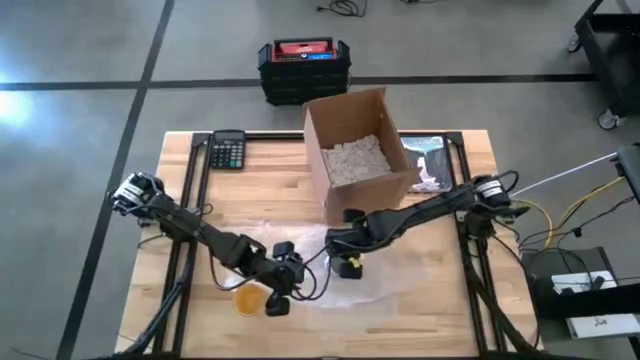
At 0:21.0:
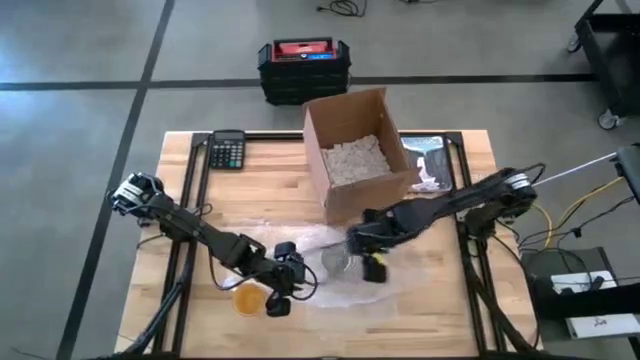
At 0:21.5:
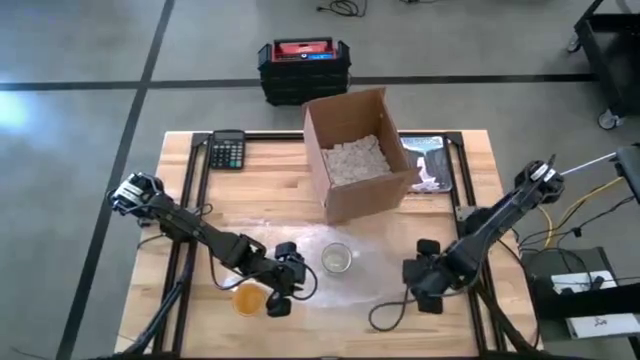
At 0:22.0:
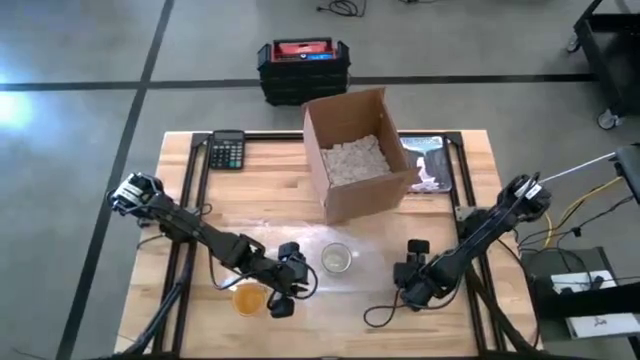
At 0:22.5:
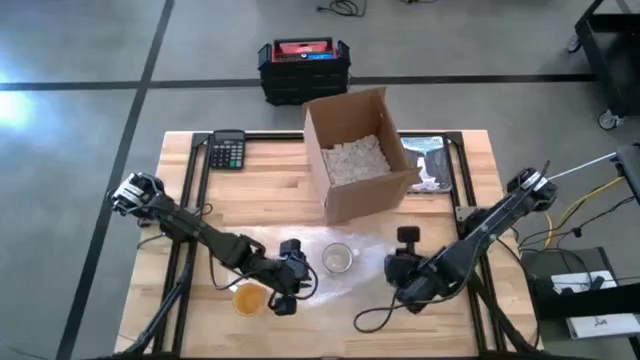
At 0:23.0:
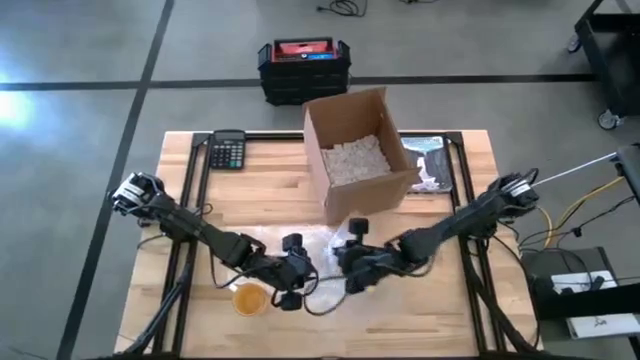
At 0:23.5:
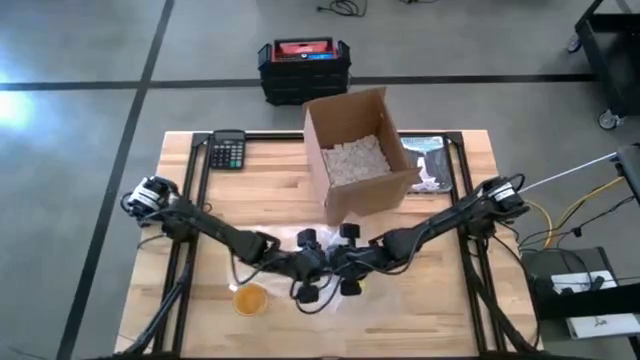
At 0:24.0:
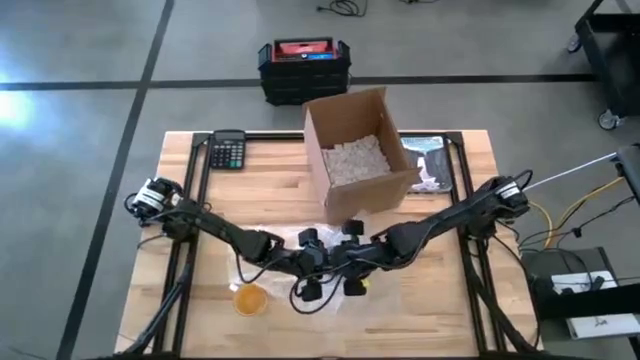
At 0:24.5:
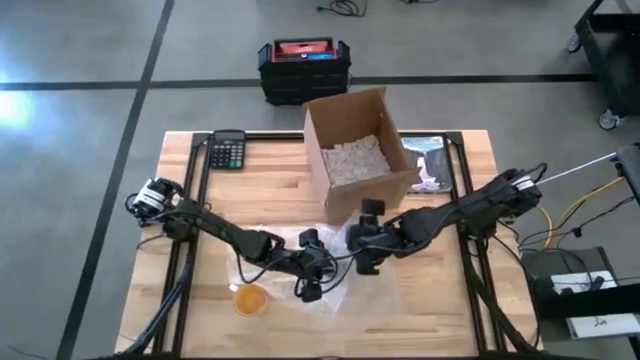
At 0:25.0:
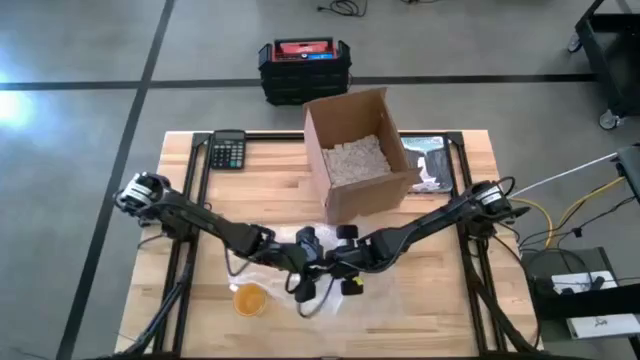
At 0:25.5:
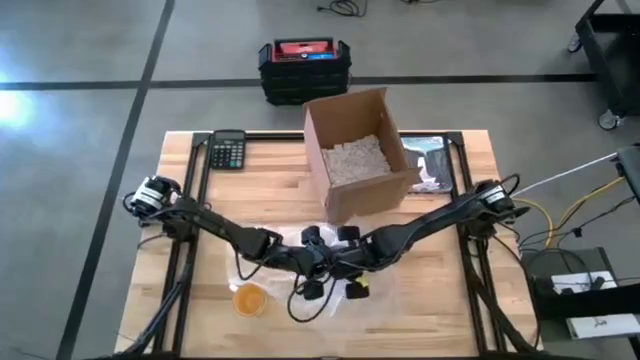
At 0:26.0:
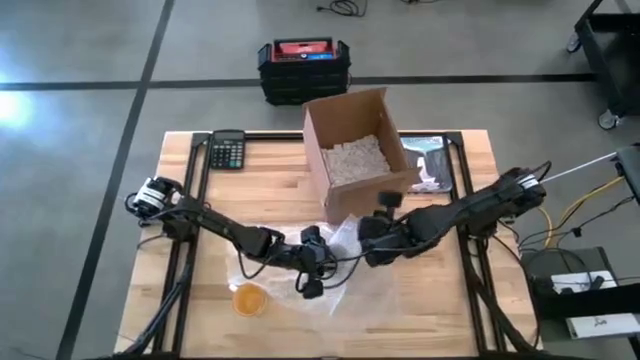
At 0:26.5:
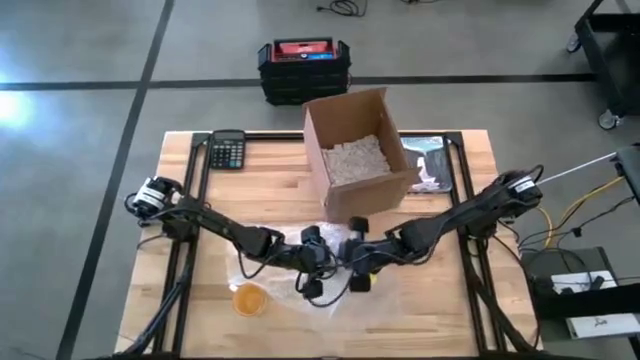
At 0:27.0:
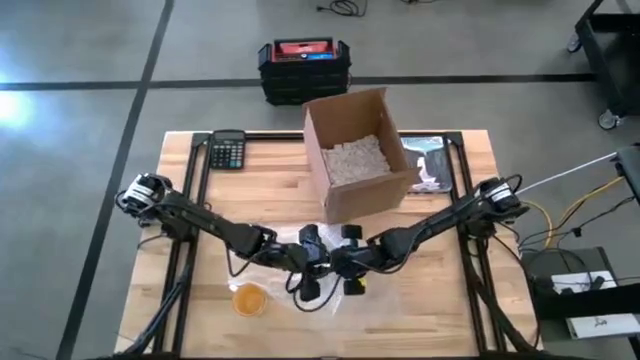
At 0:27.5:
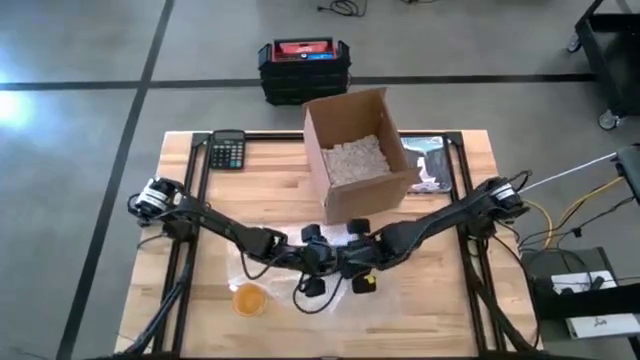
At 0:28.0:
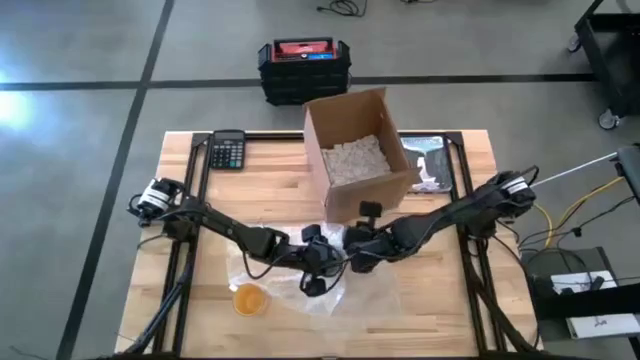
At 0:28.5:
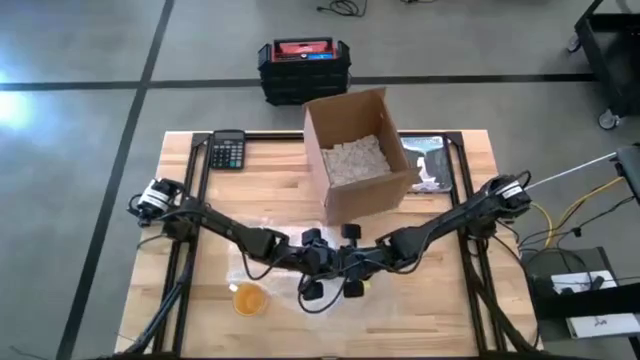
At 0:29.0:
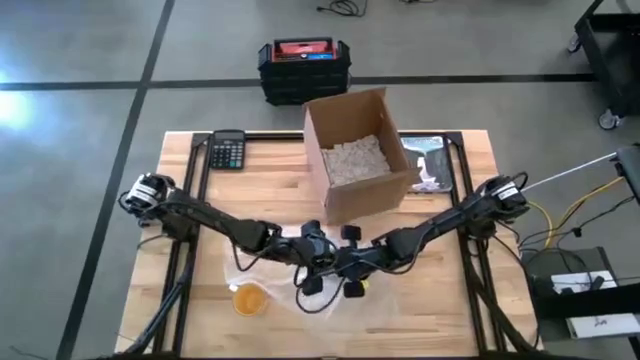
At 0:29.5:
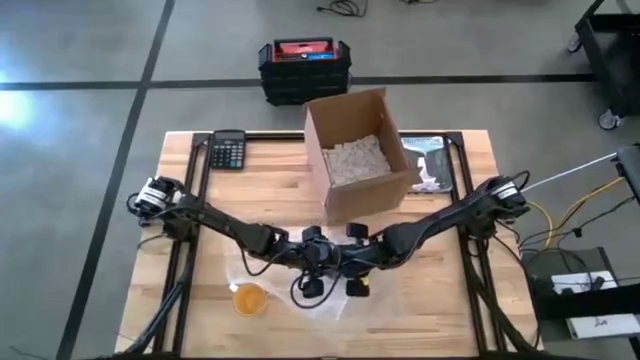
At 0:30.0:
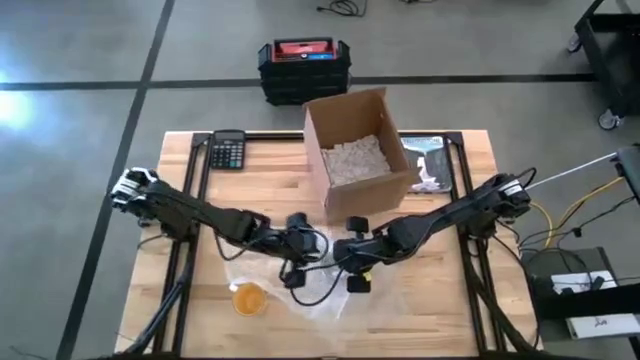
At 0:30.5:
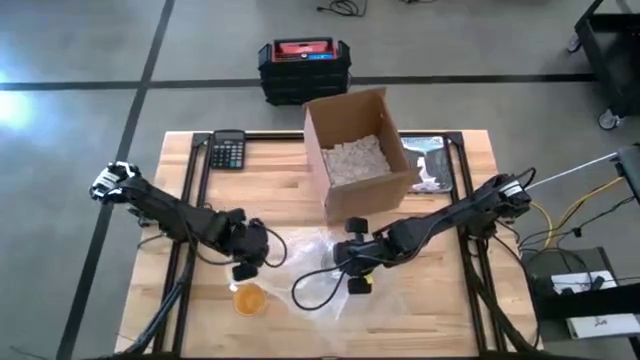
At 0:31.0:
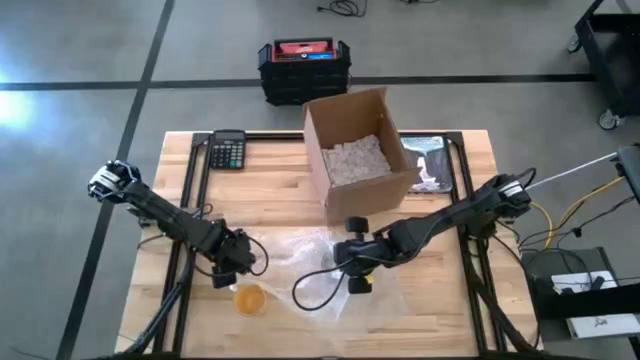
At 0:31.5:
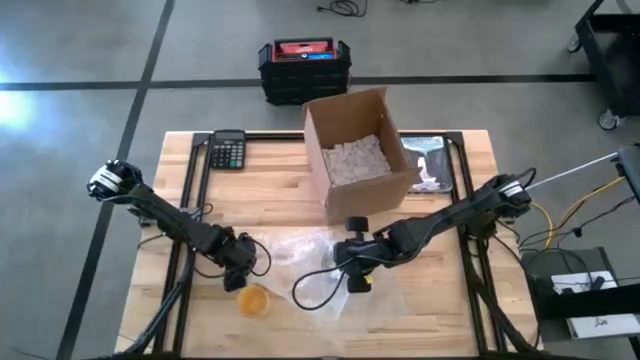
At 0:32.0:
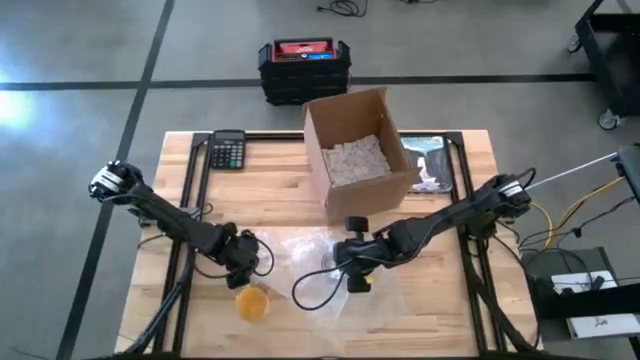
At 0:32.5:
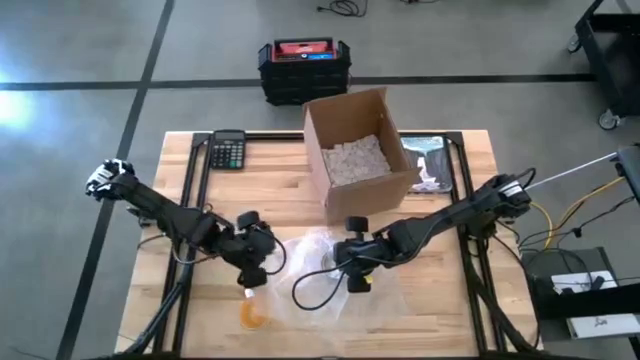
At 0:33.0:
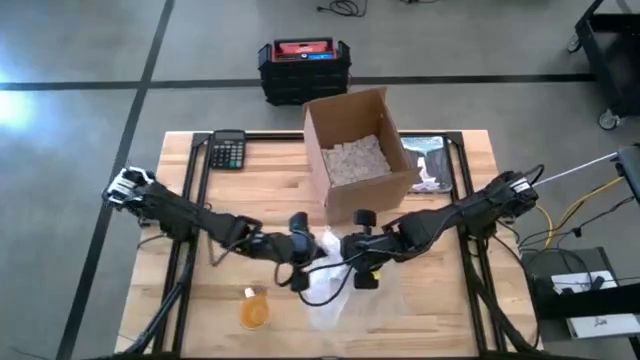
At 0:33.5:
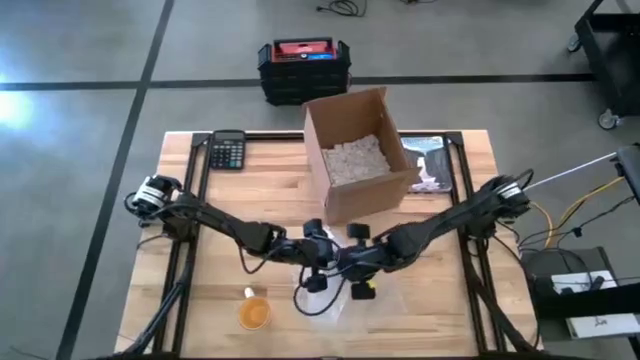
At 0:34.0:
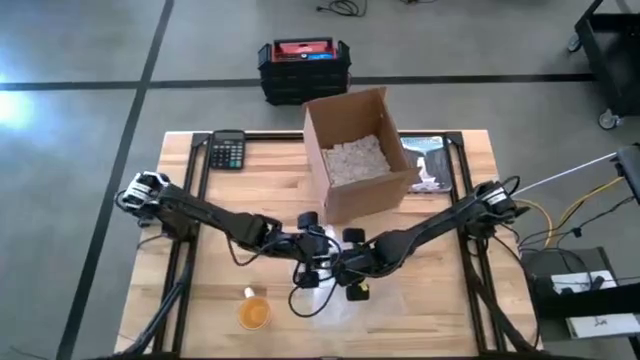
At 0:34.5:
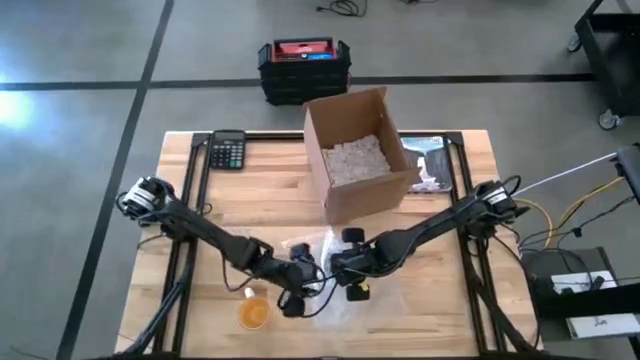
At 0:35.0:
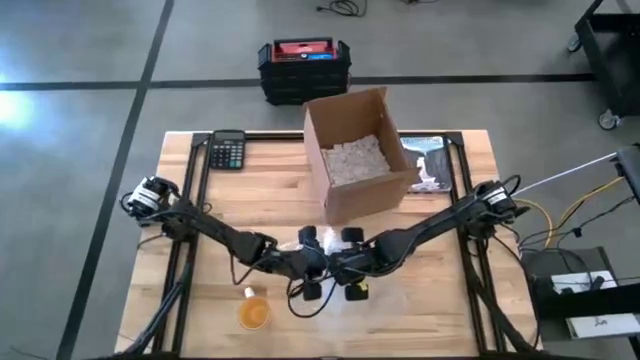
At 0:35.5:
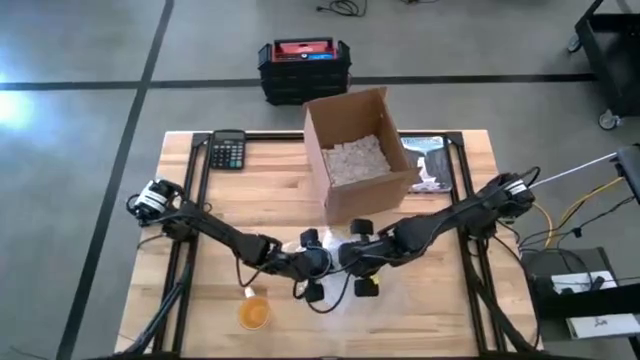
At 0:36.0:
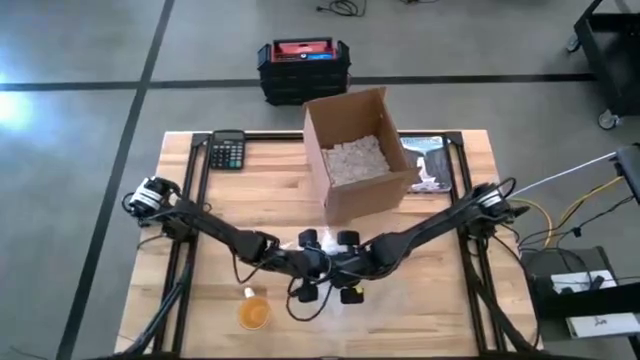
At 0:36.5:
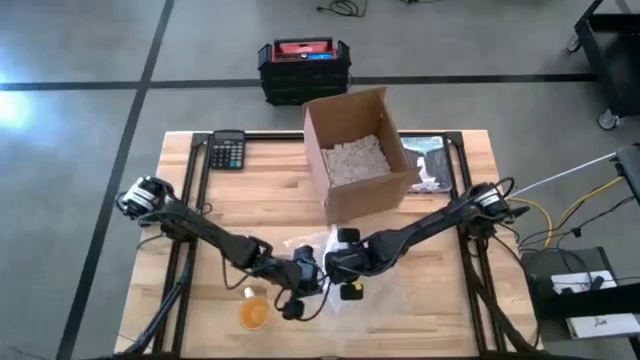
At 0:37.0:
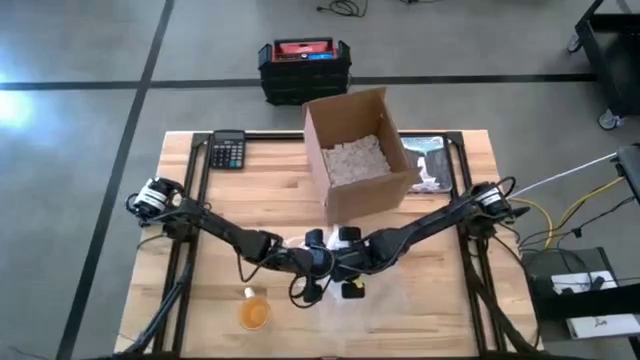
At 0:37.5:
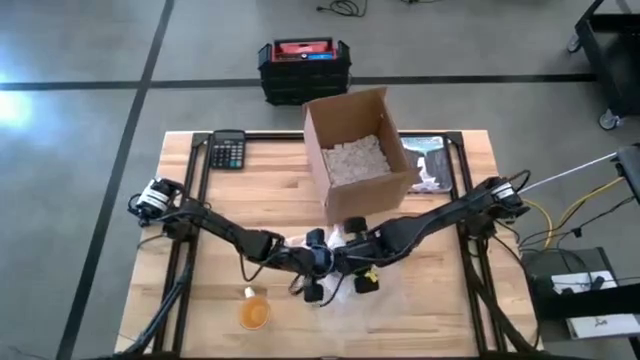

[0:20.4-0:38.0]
Task: wrap mug
Wrap the white cup in bubble wrap
